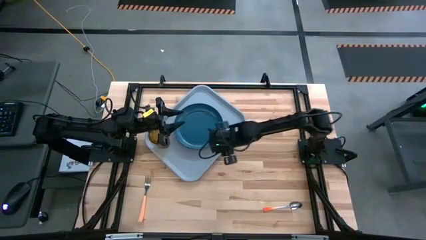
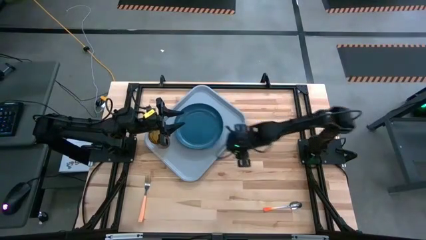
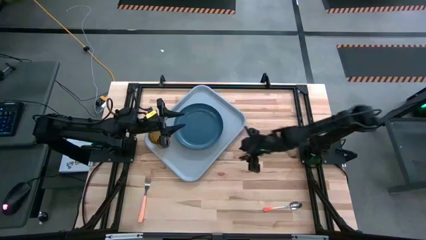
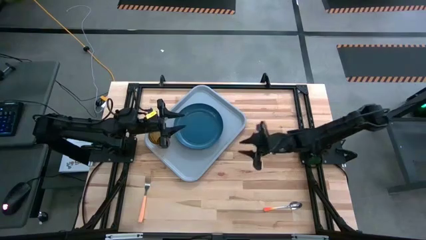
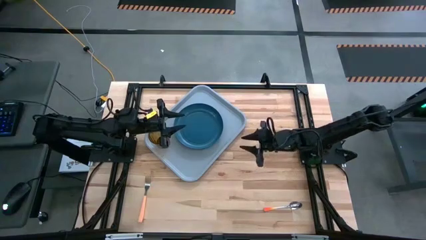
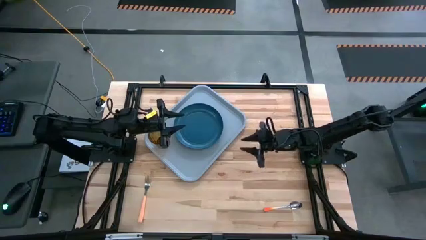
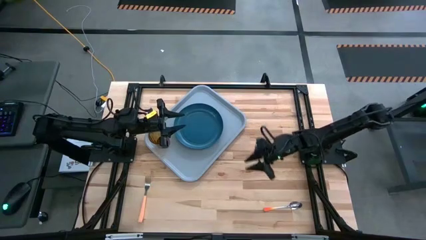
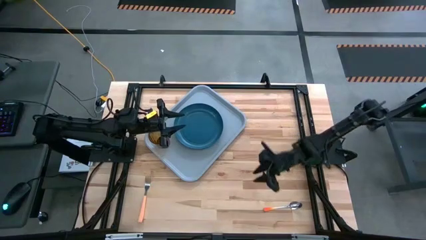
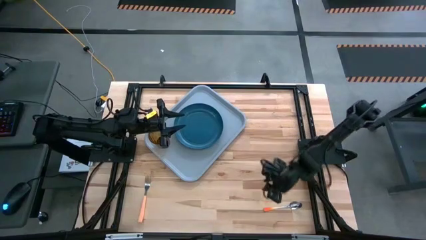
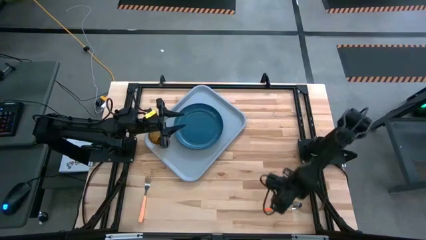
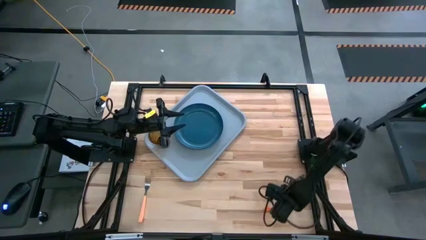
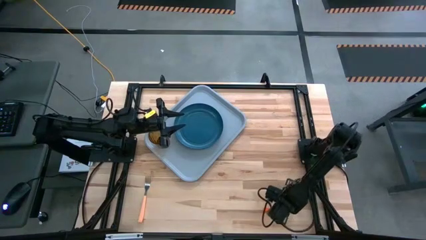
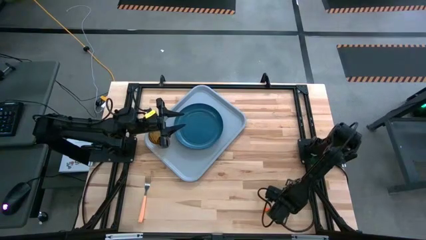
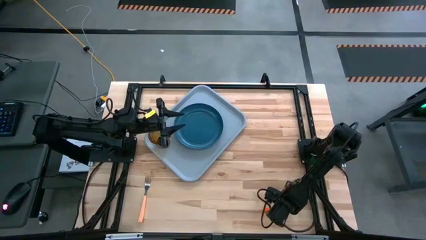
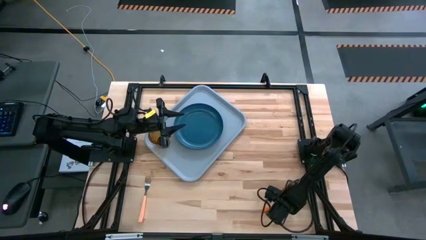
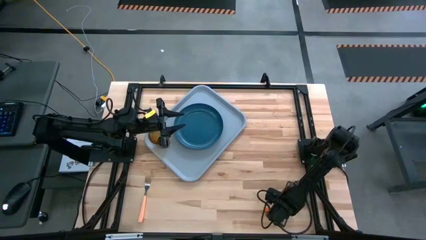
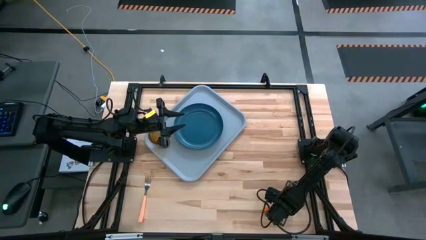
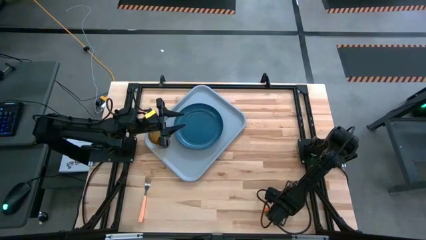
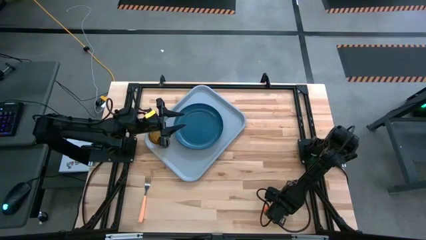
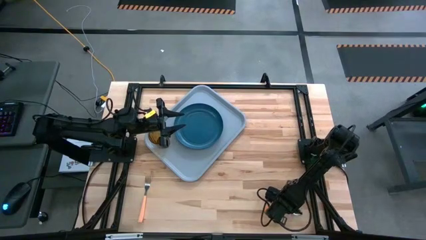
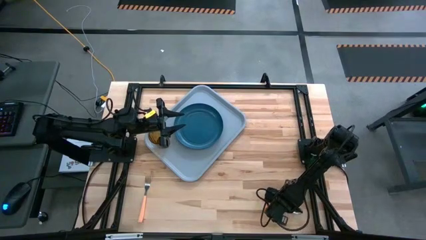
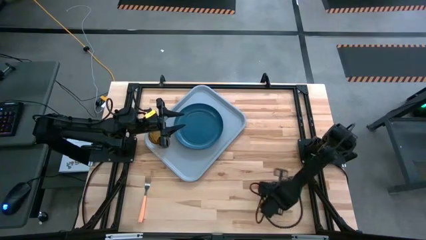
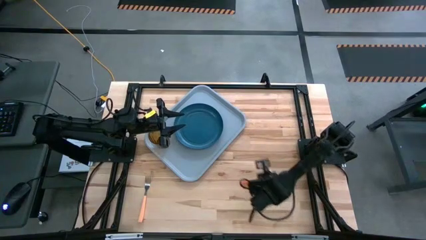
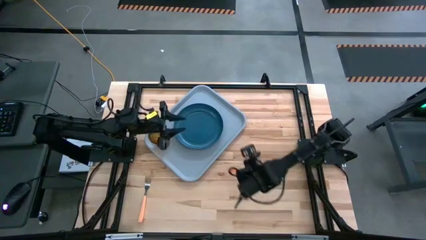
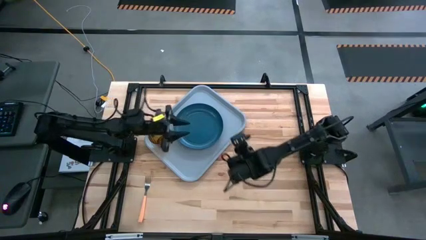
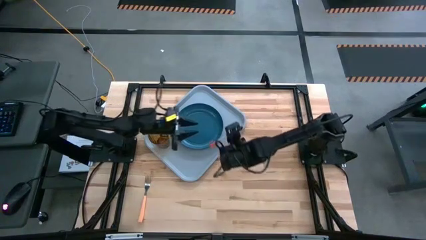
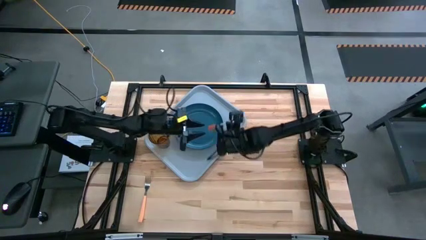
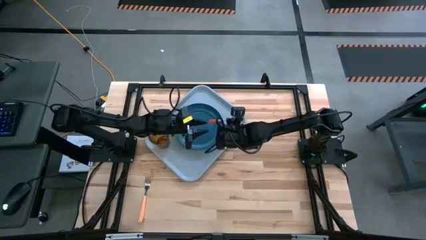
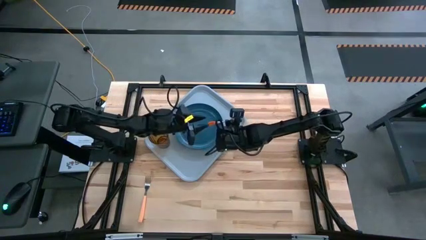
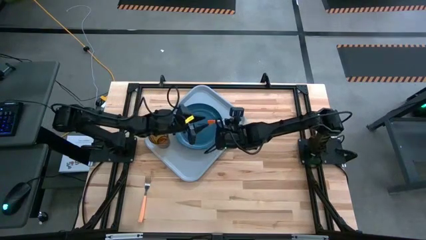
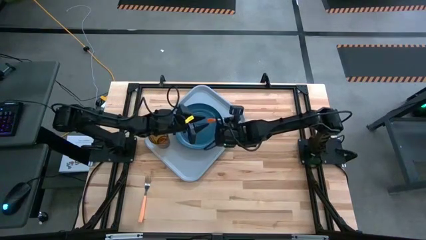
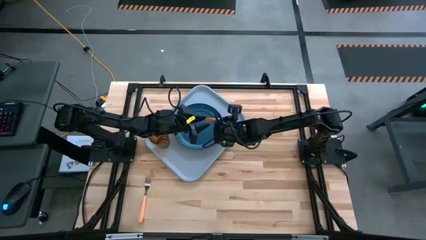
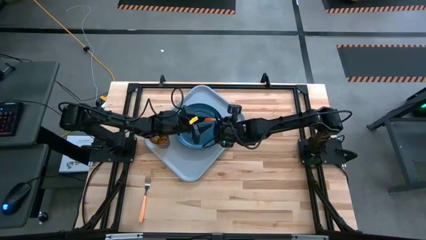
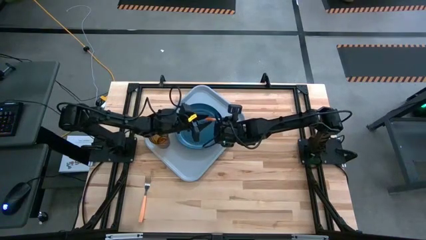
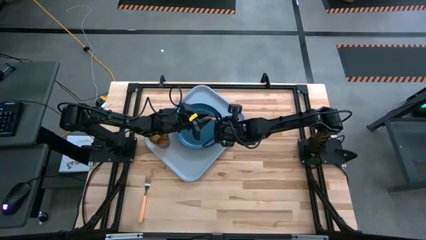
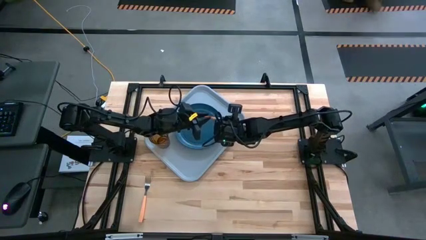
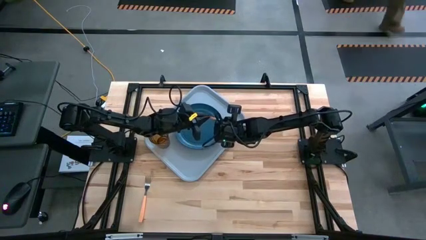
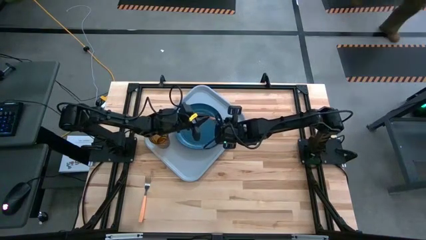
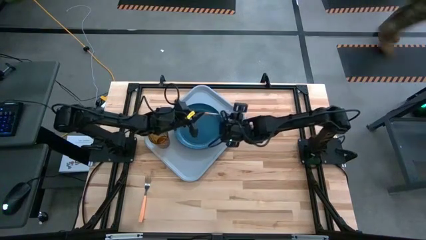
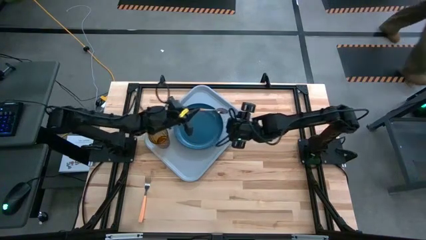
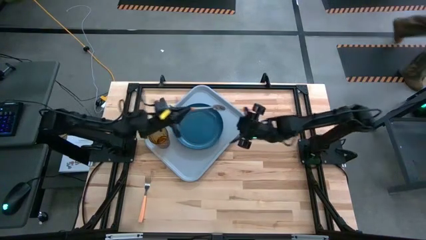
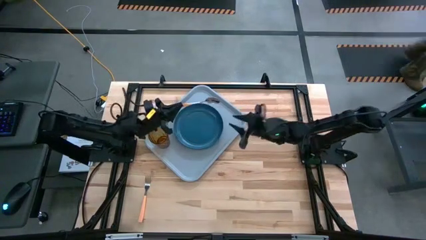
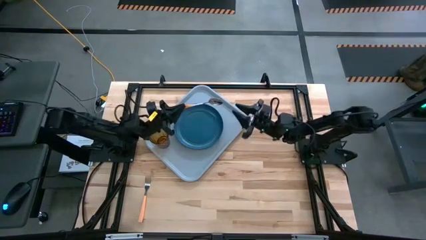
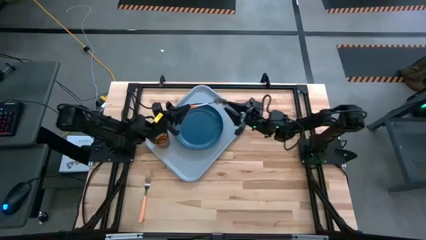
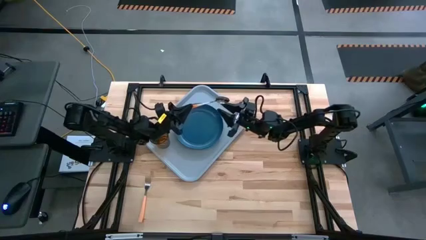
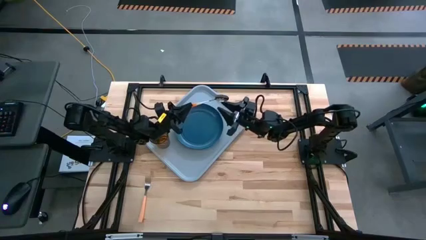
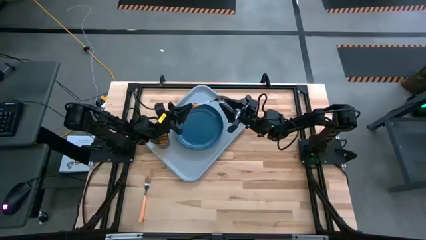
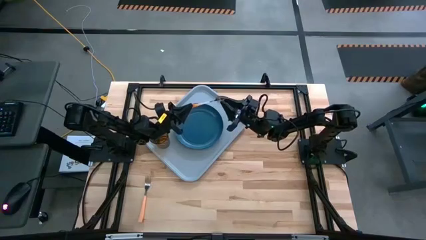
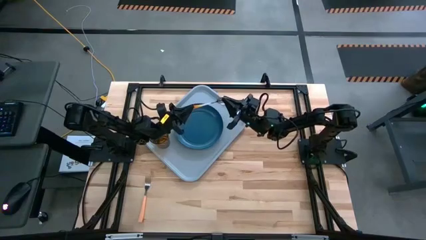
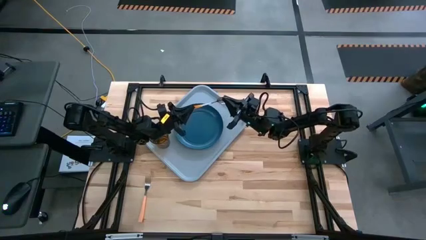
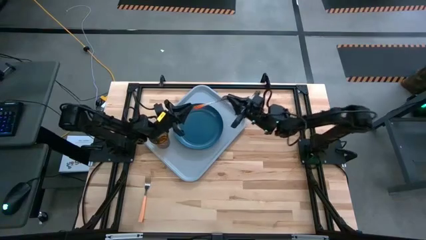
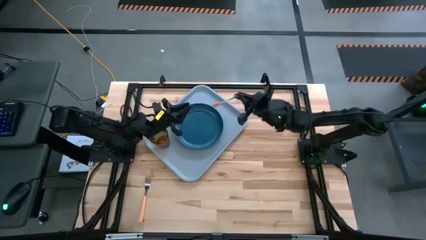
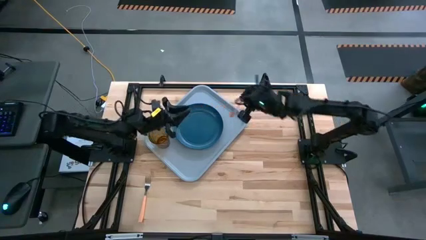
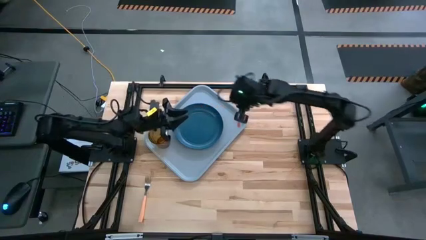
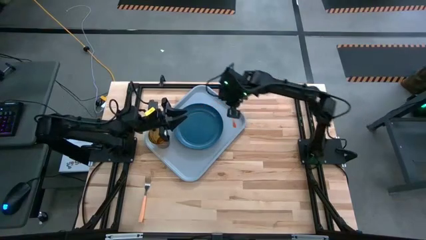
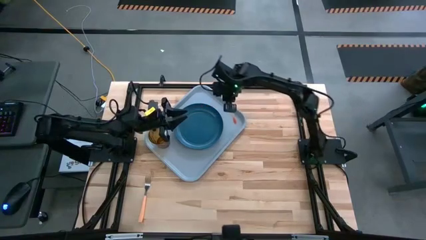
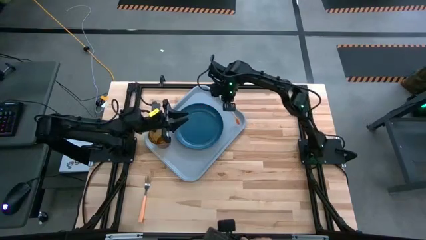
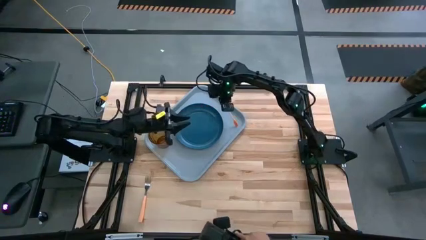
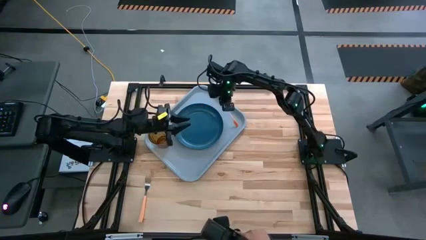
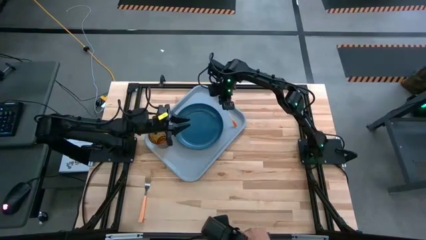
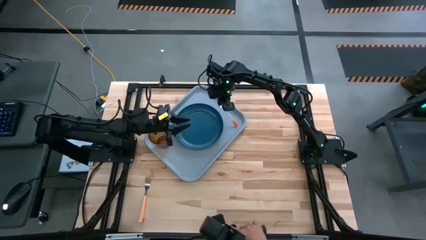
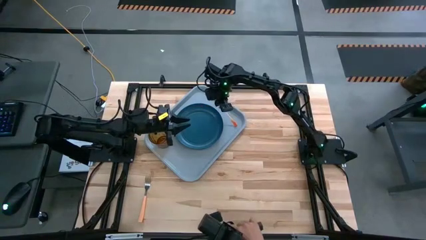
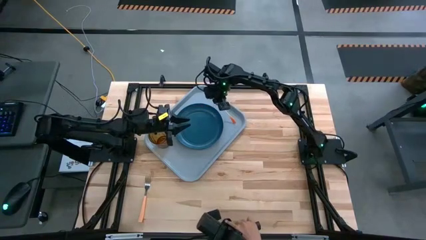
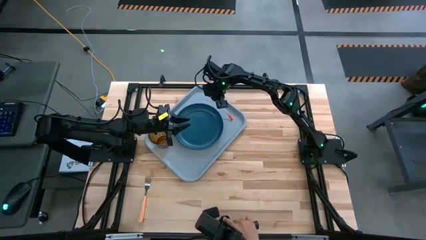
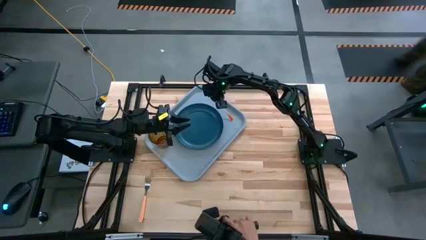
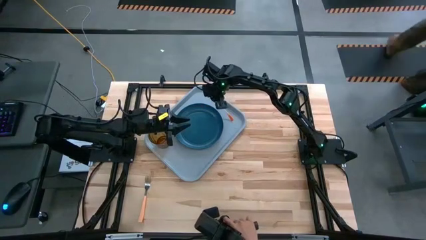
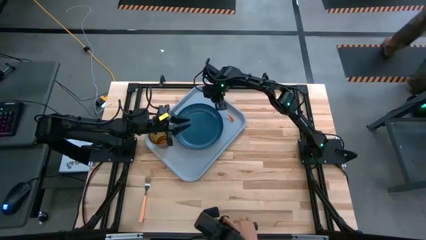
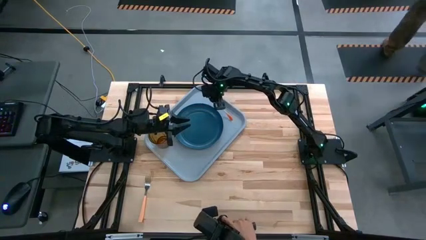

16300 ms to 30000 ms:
Task: Pick and place plate/cup/fork/spoon on tray
Put the spoon on the tray

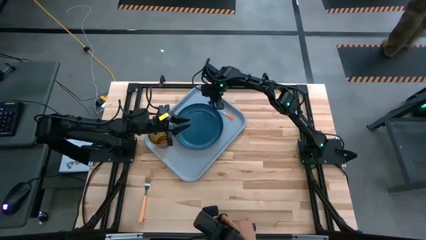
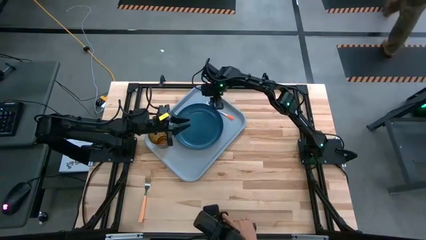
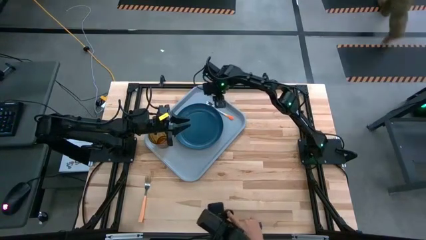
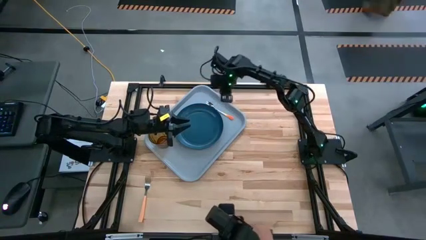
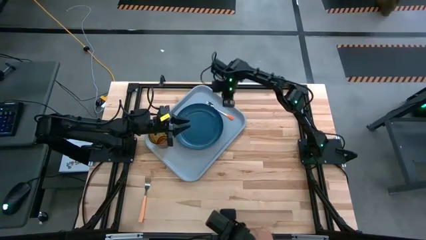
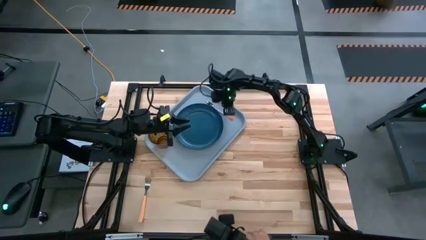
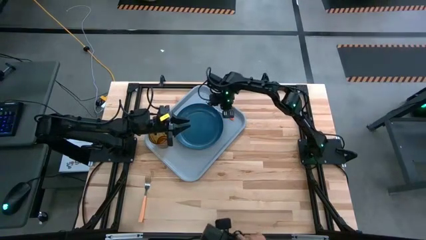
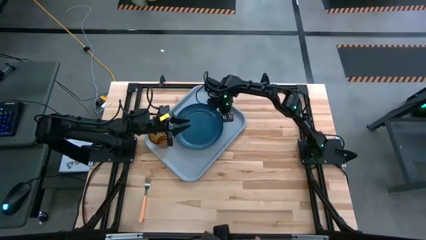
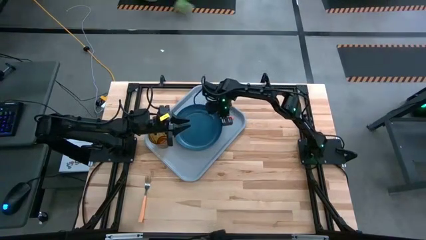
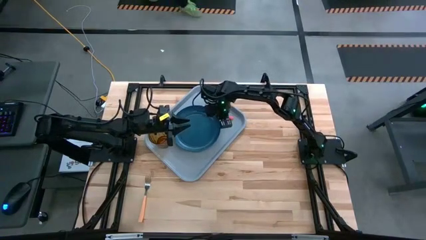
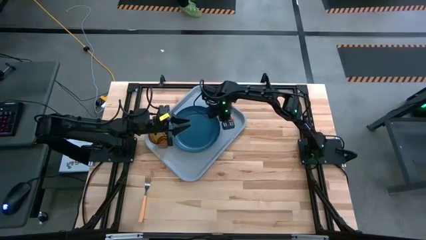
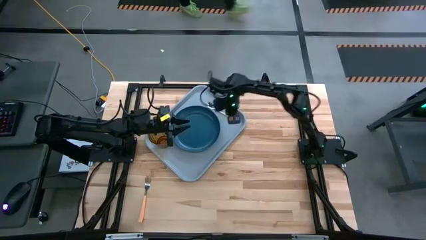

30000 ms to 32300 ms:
Adjust the dark blue plate

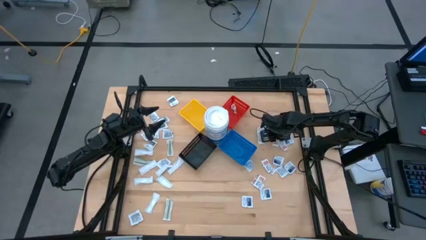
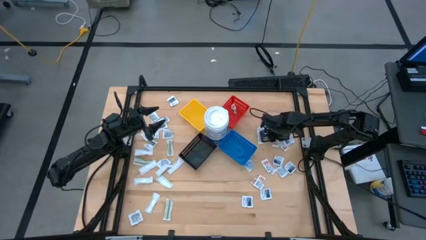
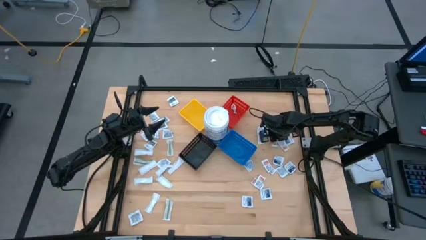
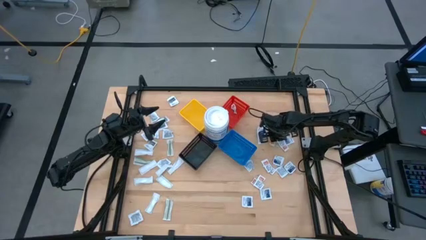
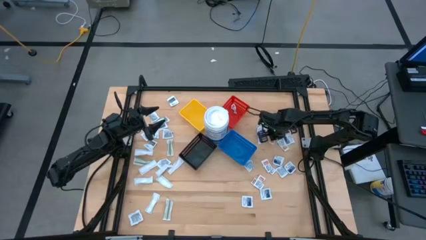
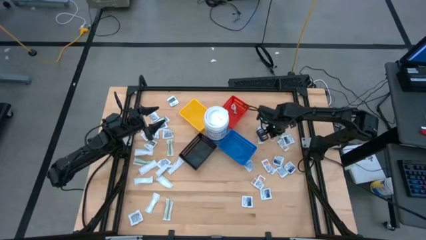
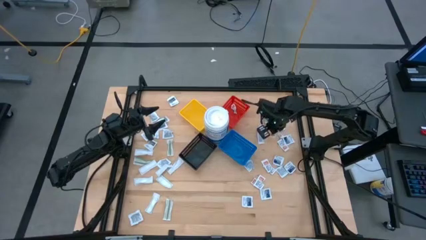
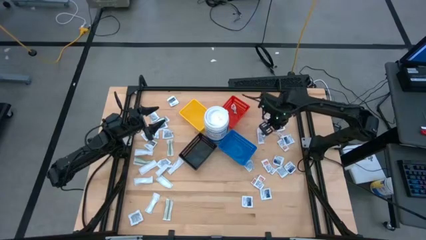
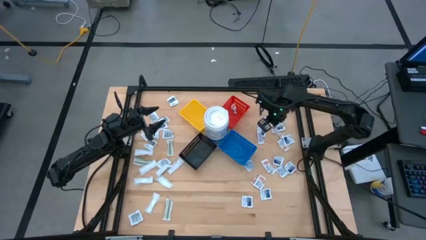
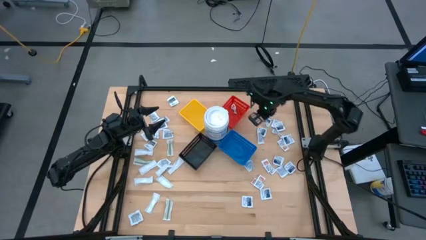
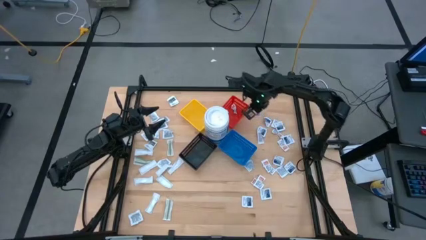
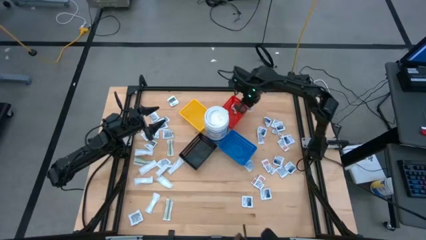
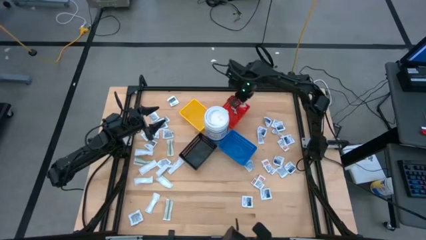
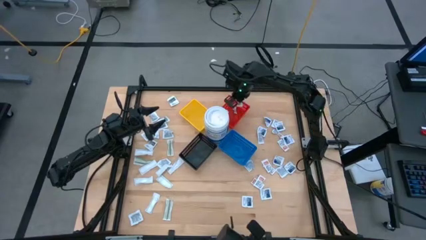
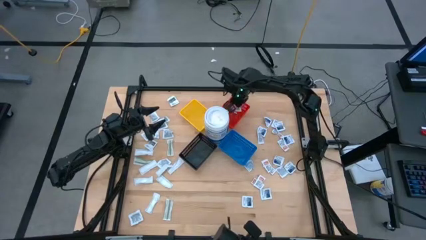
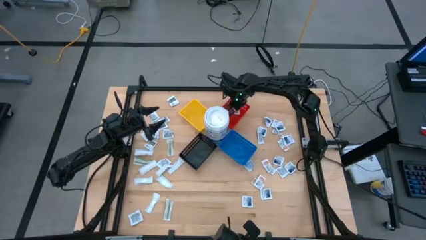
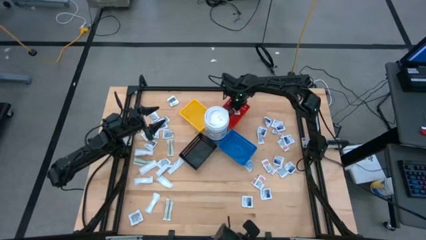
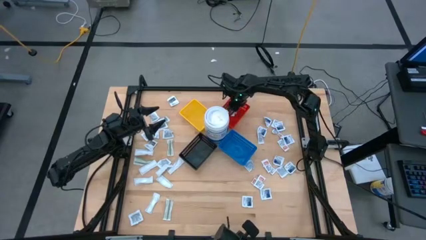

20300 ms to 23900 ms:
Task: Pick & Place First Aid Supplies
Put the ointment pack into the red bin
